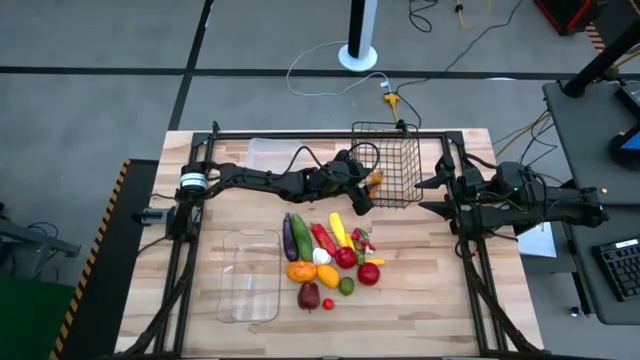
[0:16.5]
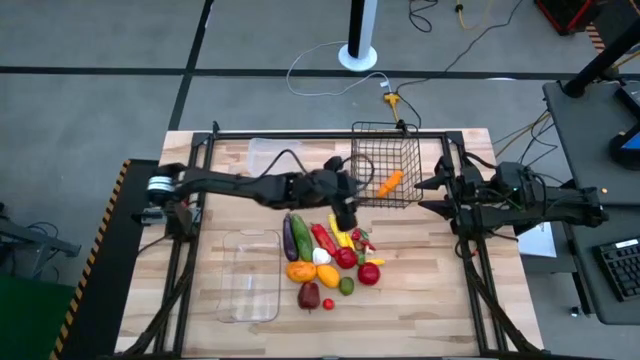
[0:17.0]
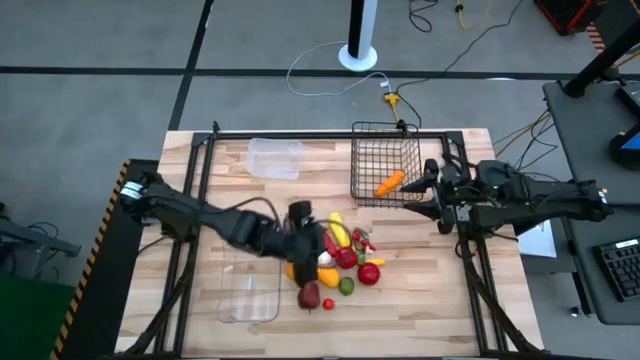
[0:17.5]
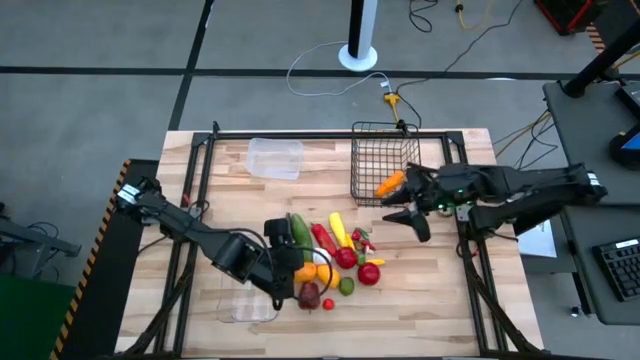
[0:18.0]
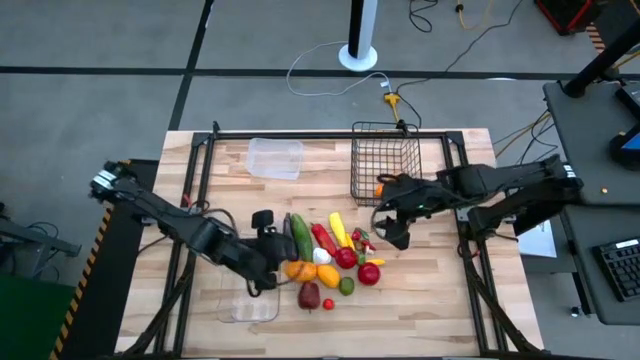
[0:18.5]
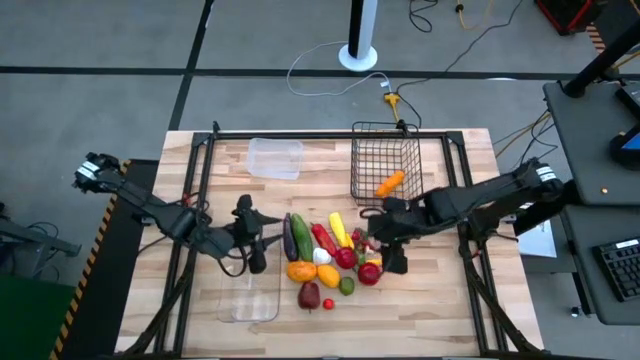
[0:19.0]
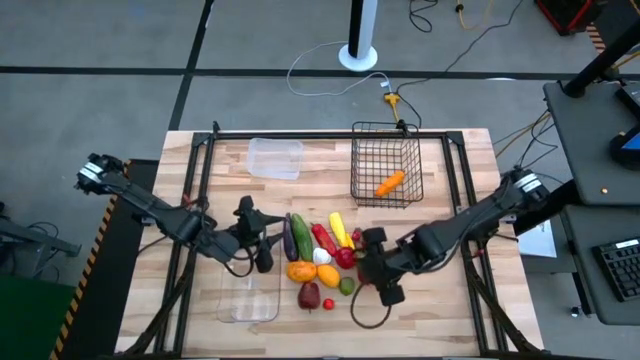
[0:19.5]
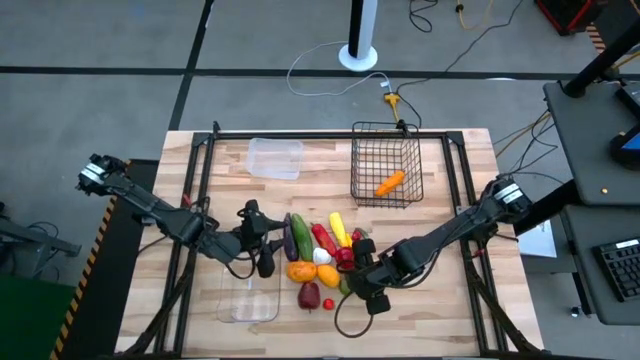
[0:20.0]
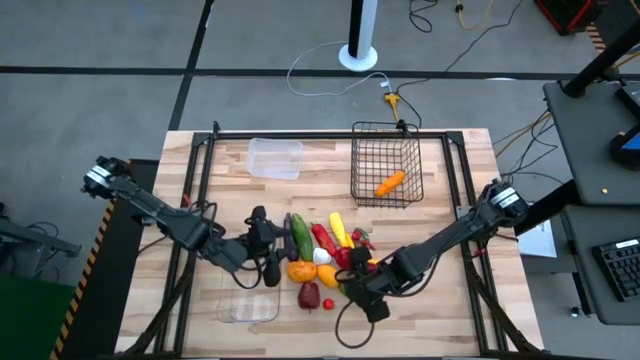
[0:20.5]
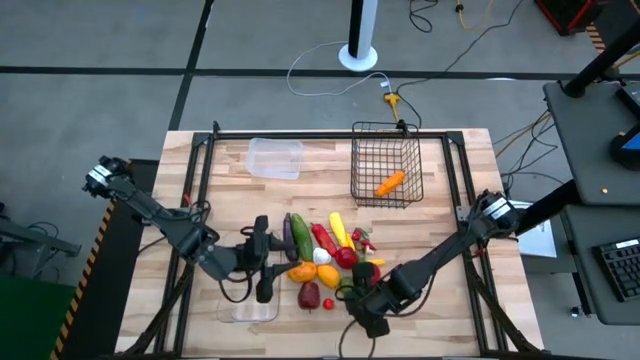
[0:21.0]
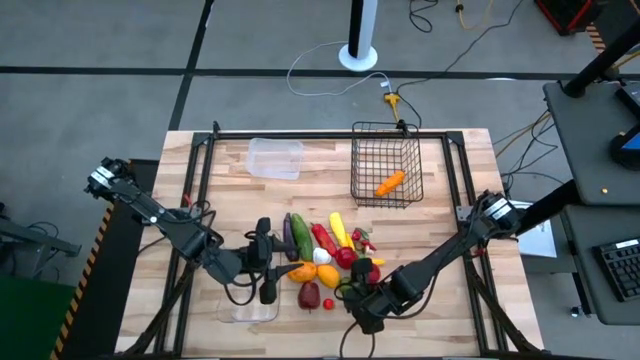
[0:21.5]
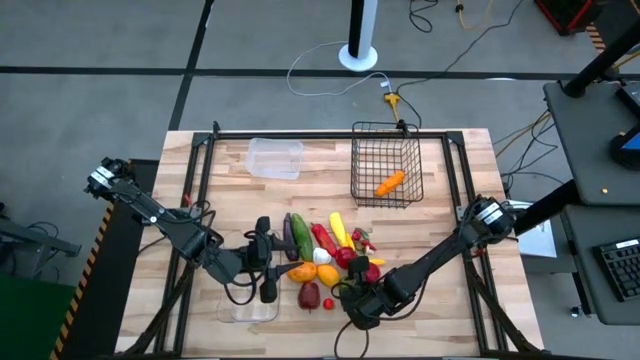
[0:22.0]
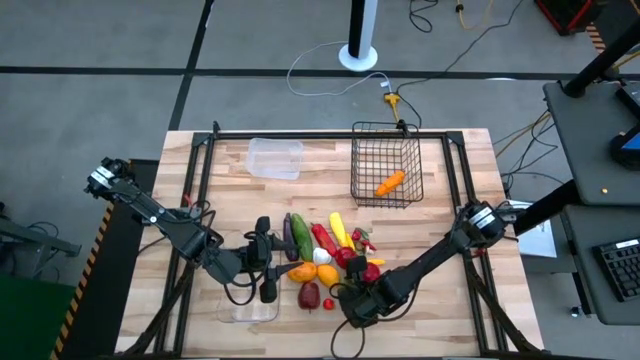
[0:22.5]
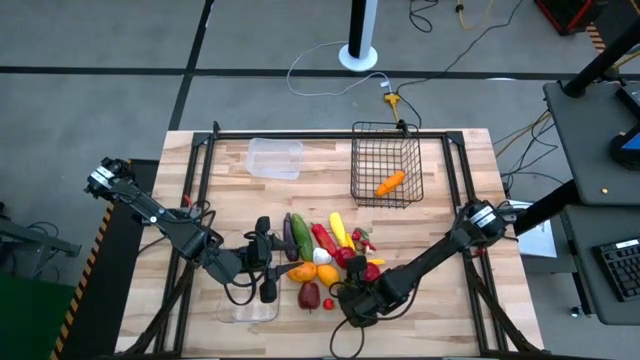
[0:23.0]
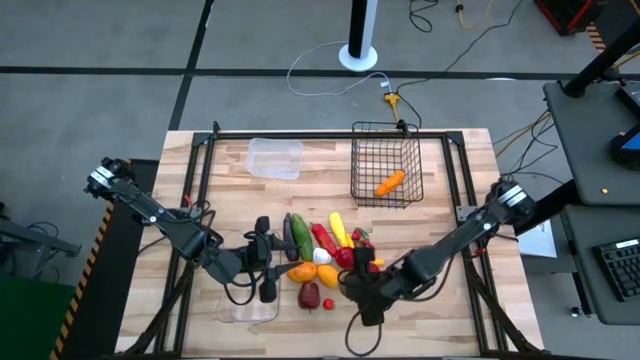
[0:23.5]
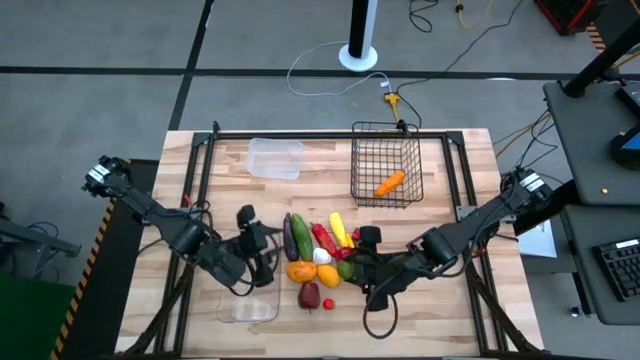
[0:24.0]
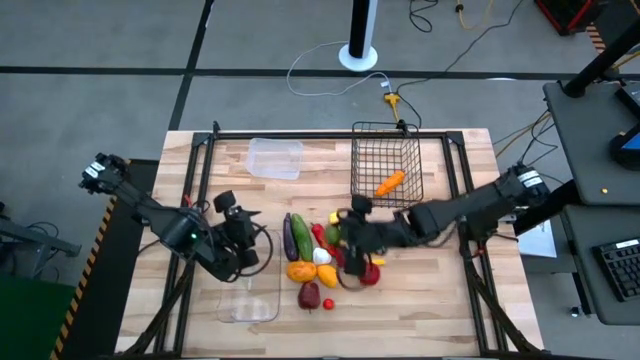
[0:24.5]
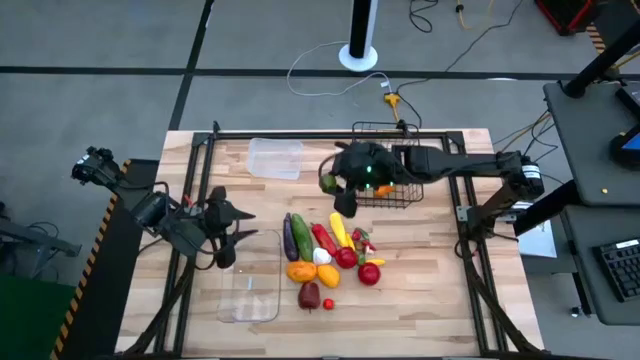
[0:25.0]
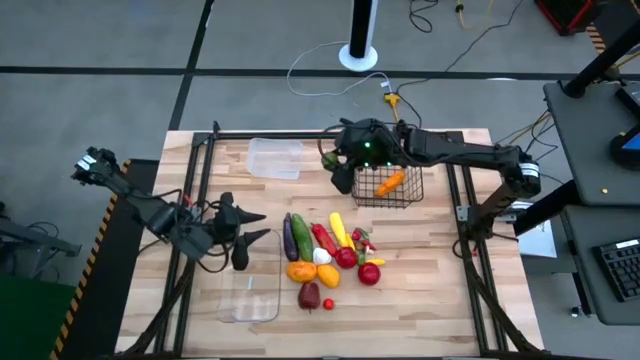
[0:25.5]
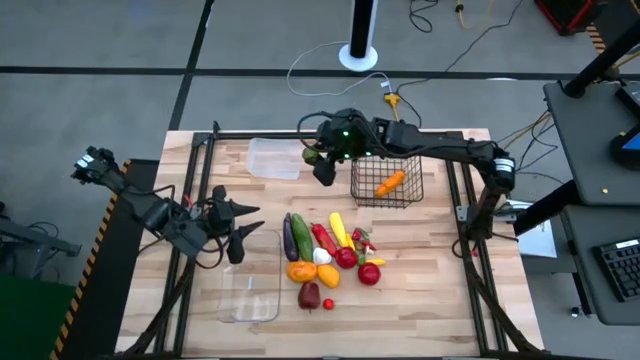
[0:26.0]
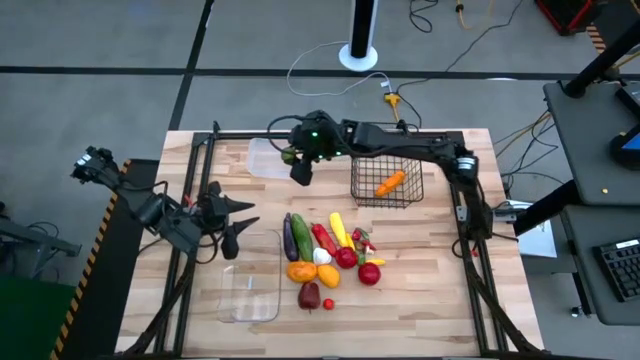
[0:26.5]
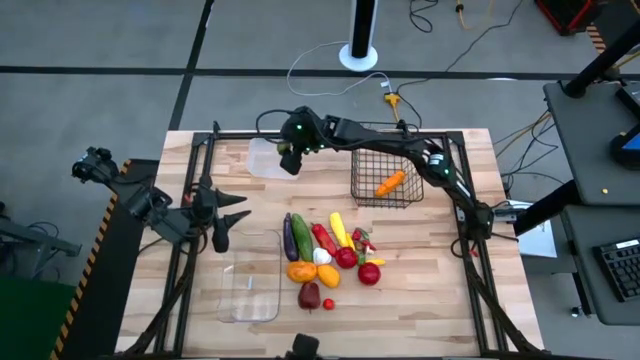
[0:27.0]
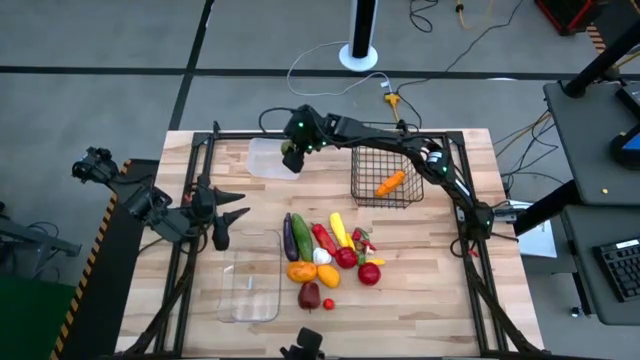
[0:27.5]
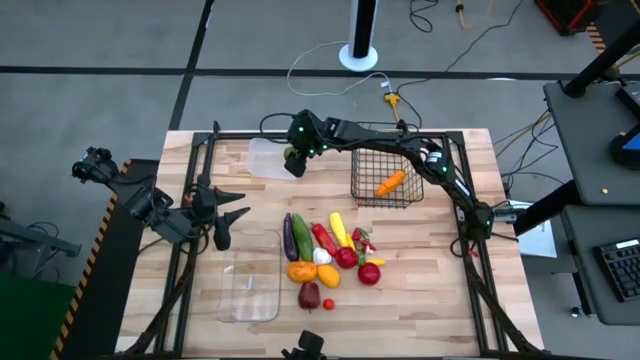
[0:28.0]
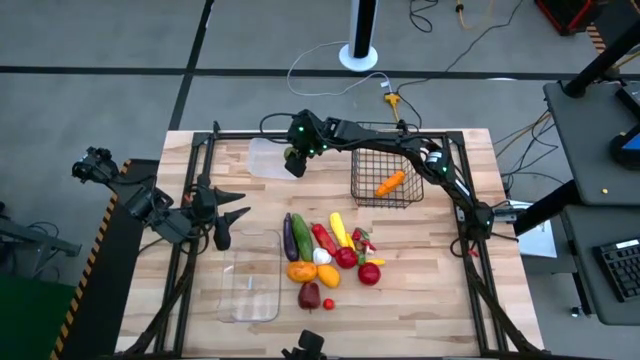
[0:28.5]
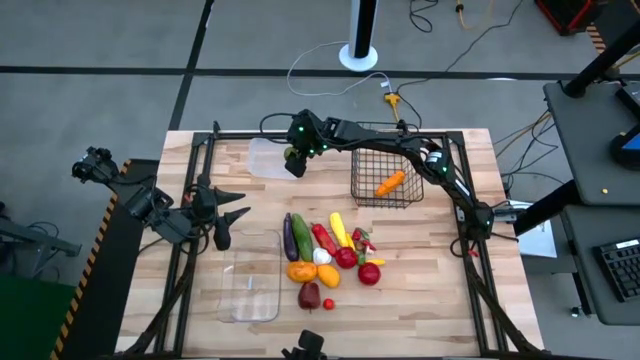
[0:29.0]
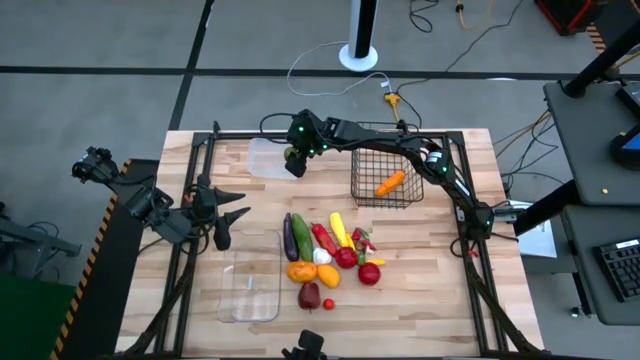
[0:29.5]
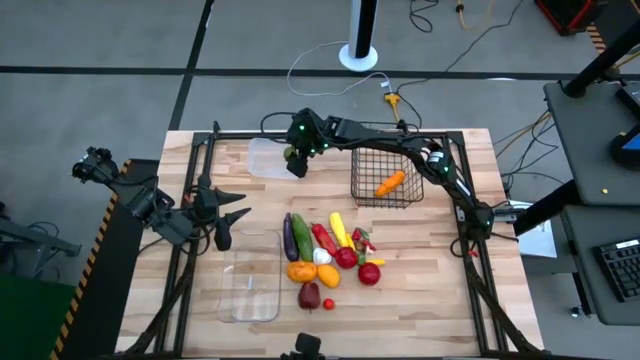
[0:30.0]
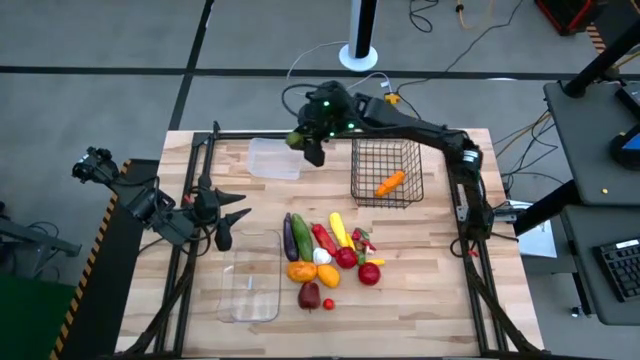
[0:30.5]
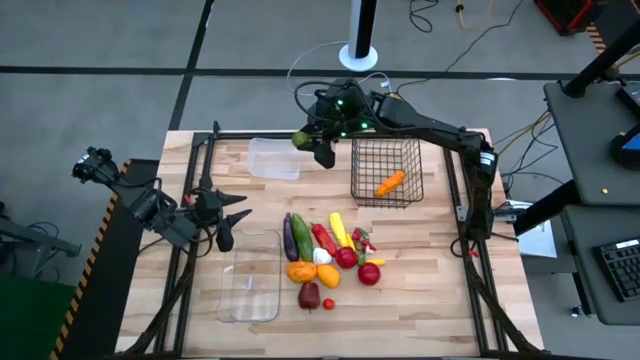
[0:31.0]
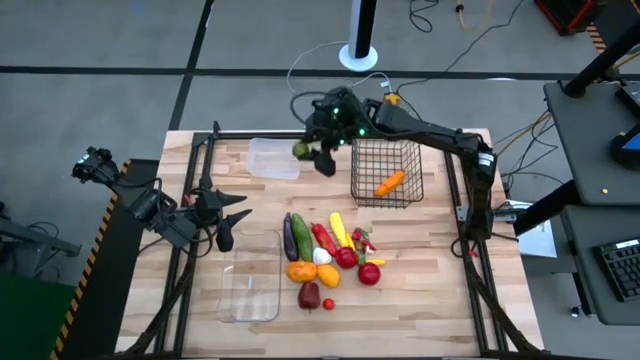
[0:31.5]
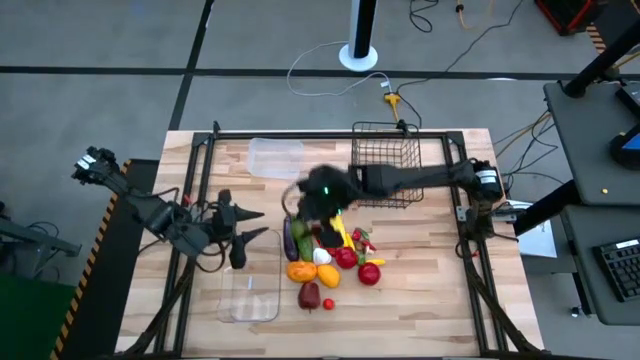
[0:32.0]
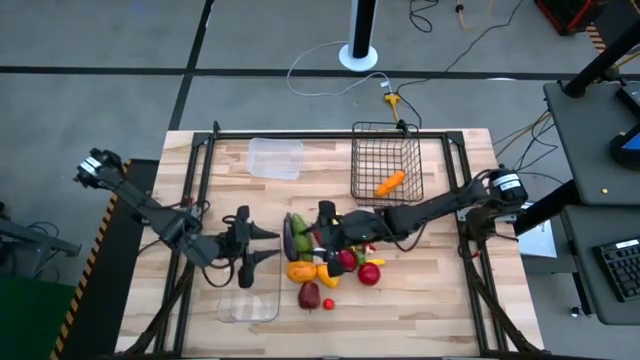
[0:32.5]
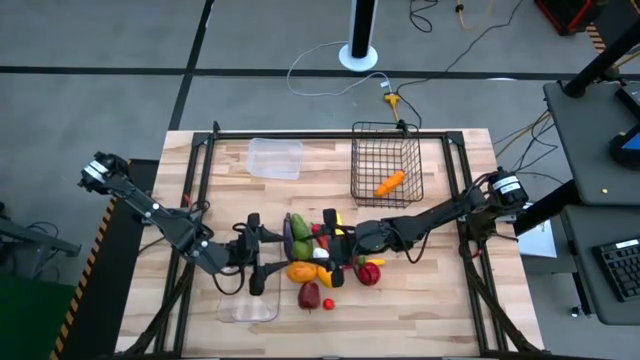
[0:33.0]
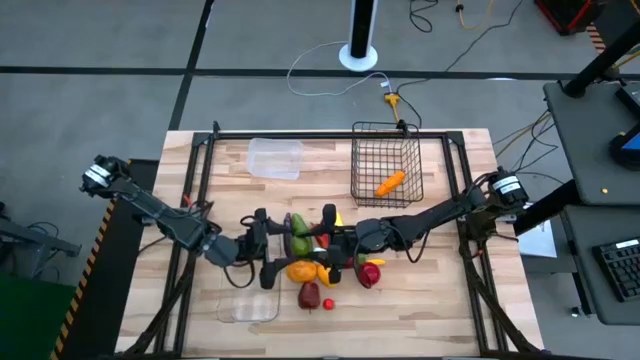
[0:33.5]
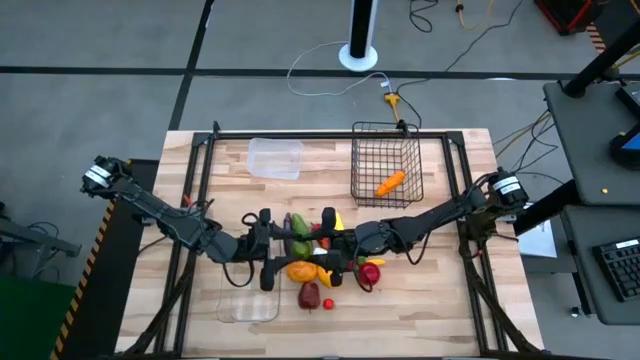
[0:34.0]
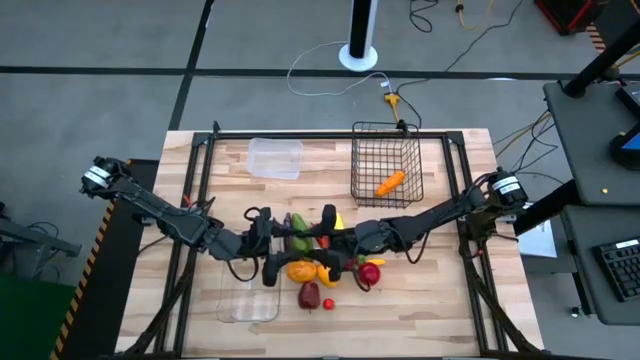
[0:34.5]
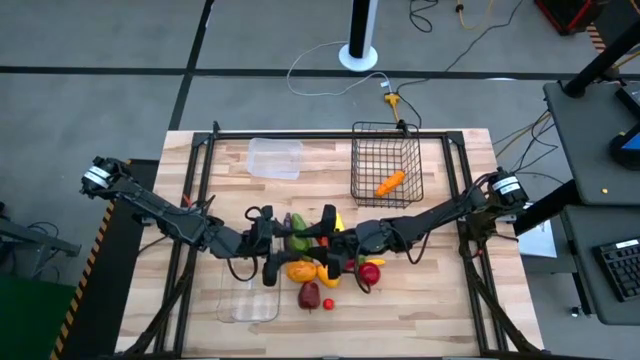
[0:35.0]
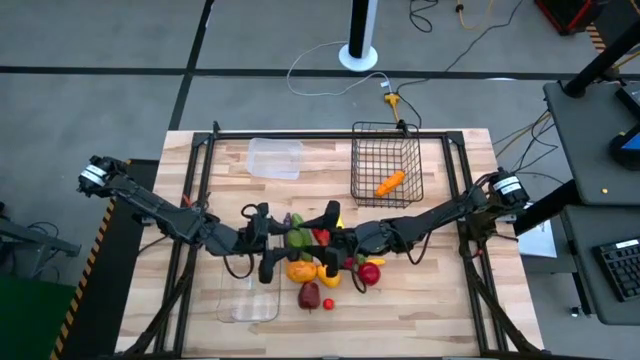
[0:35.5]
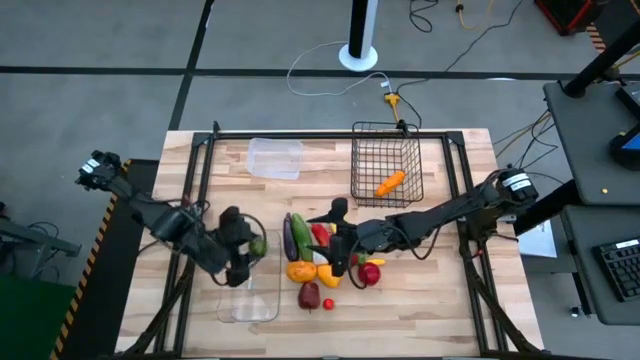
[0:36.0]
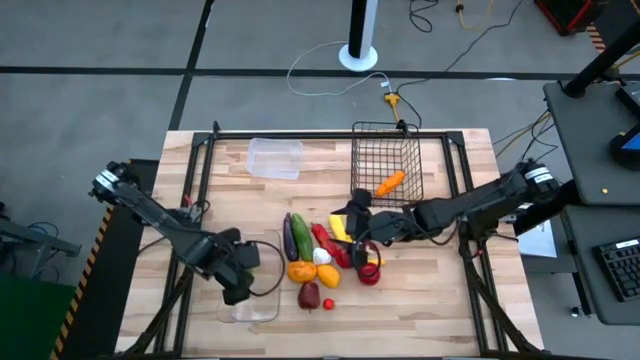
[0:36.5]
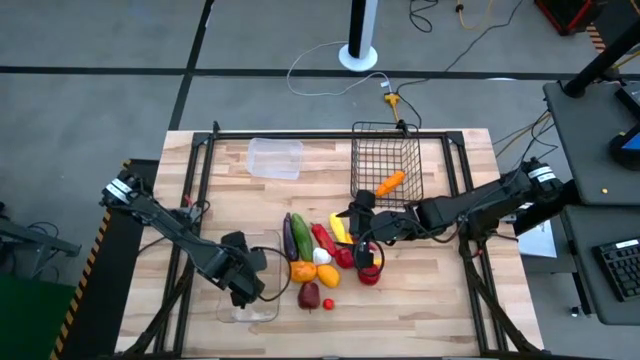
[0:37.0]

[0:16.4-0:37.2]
Task: Sort produce into baskets
Put the green lemon into the transparent bin
